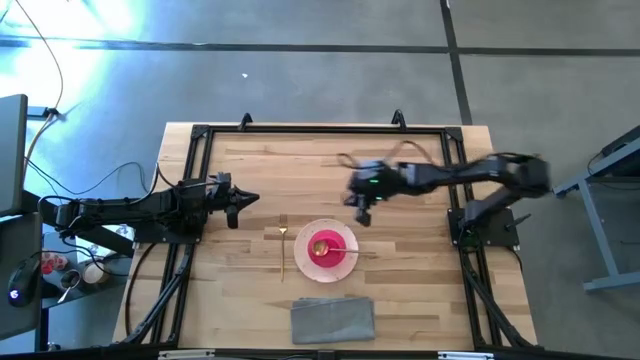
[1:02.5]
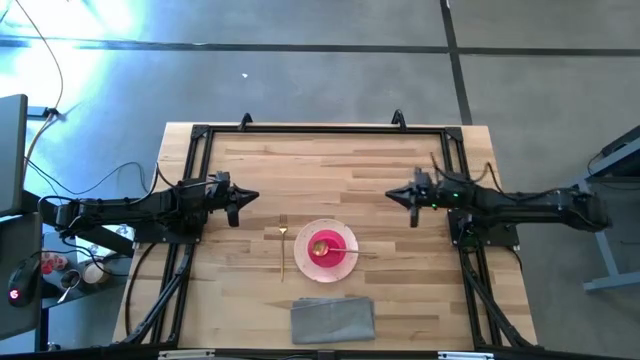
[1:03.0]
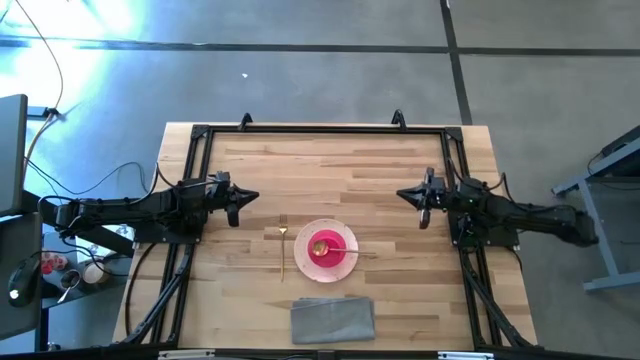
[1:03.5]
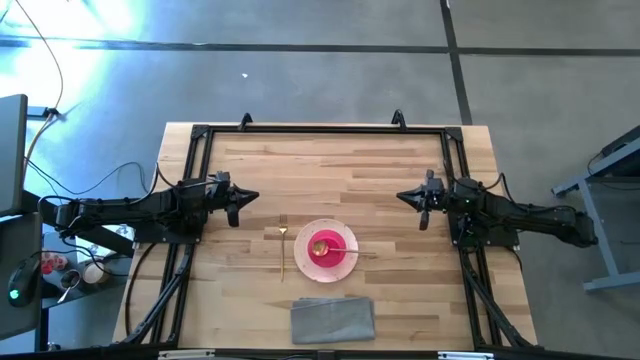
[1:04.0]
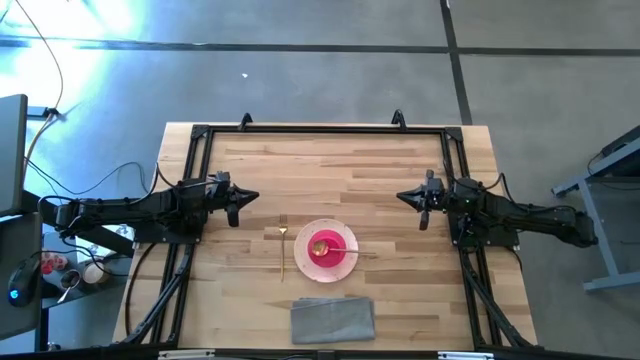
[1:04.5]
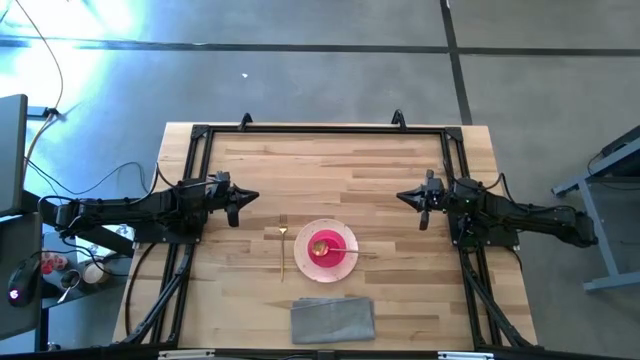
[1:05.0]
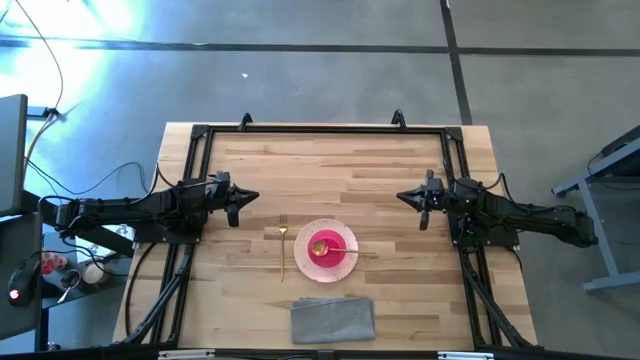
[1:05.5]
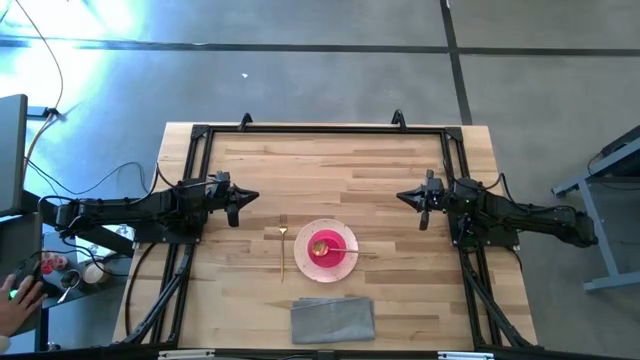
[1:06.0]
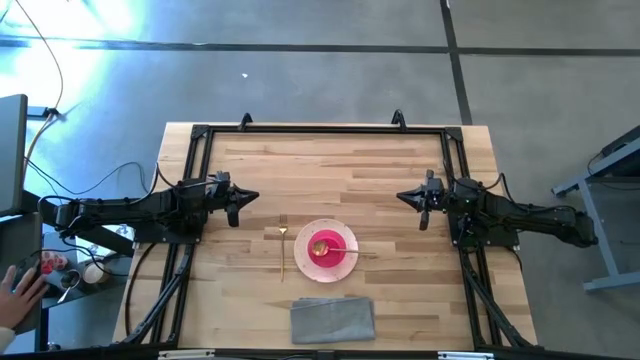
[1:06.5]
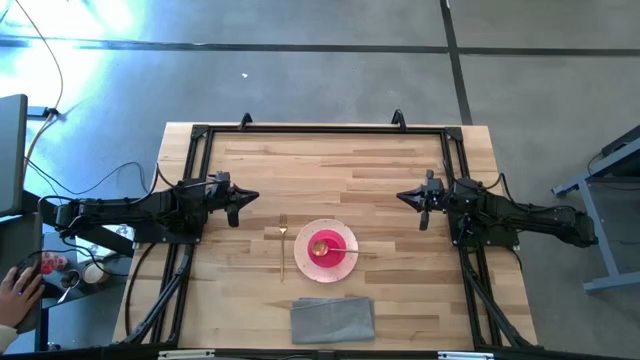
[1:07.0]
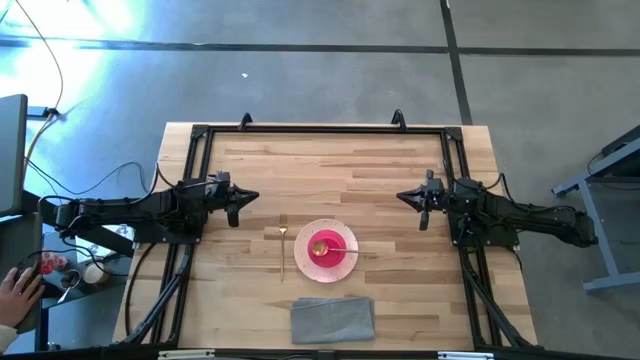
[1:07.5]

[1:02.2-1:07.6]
Task: Set table place
Return to Home Position

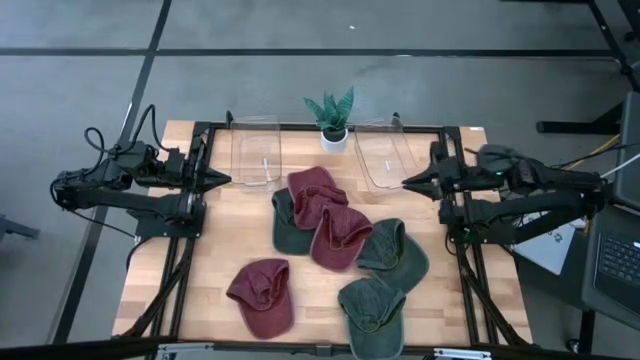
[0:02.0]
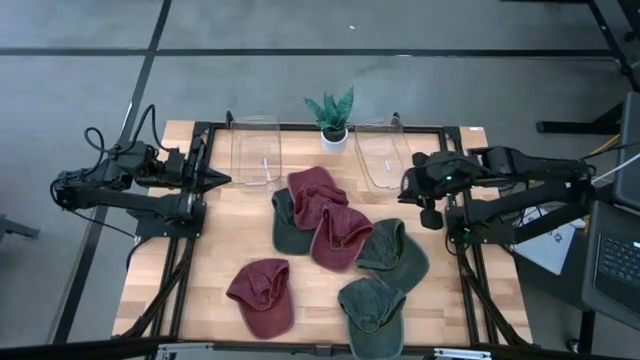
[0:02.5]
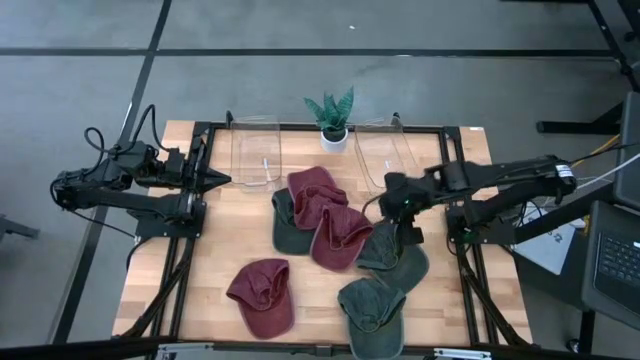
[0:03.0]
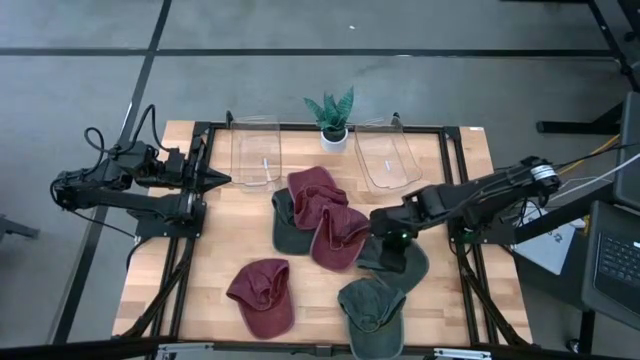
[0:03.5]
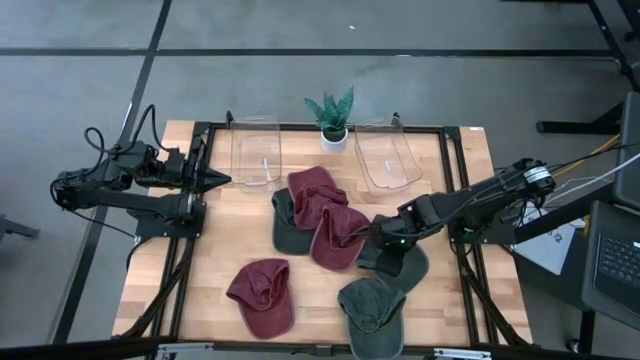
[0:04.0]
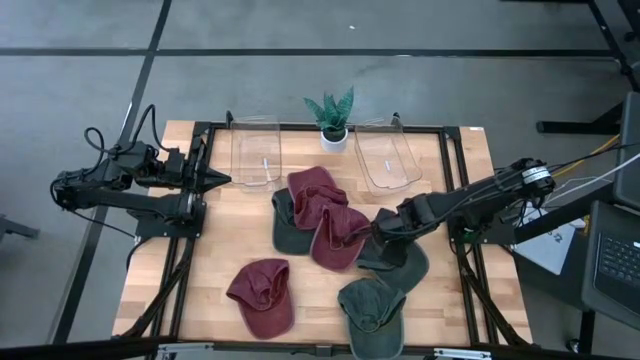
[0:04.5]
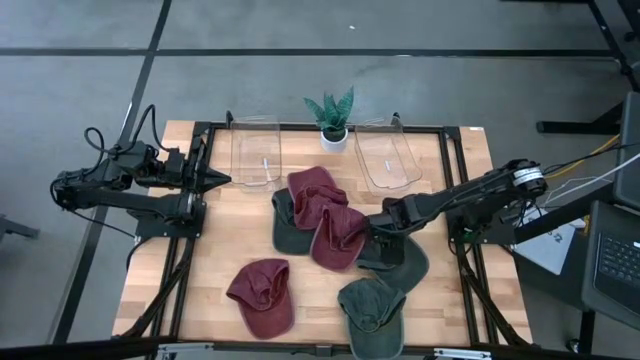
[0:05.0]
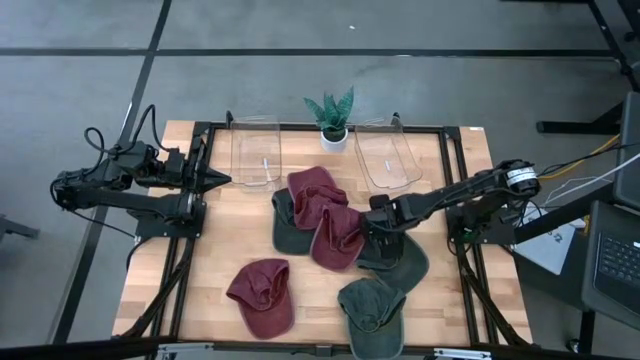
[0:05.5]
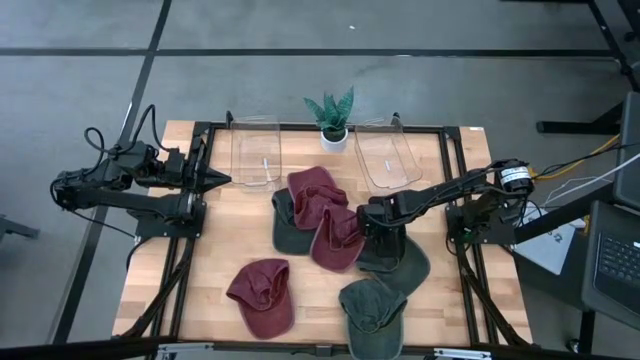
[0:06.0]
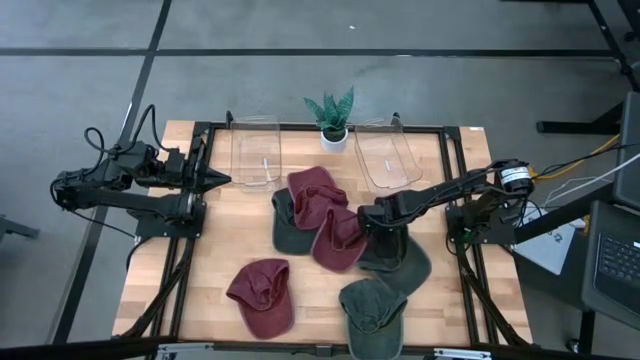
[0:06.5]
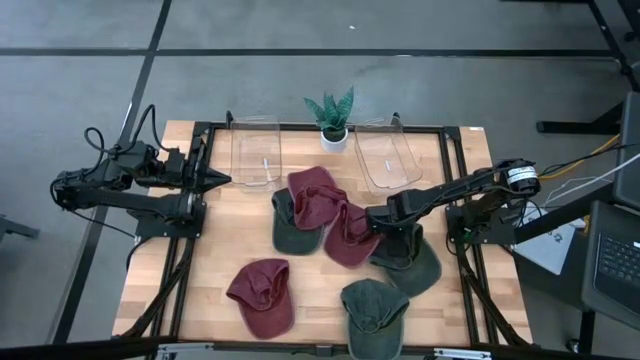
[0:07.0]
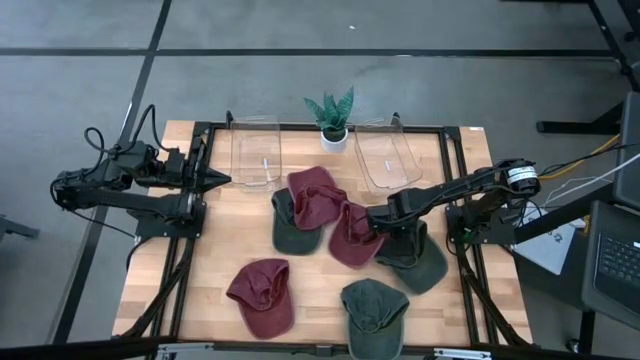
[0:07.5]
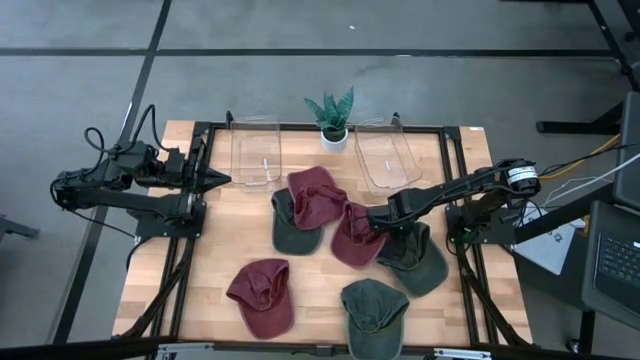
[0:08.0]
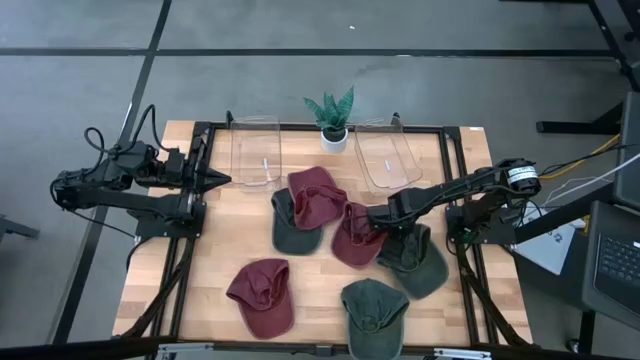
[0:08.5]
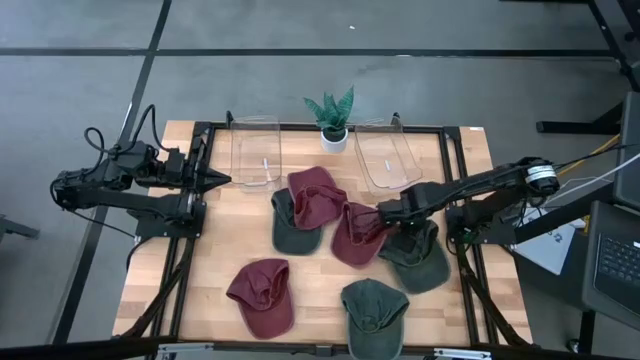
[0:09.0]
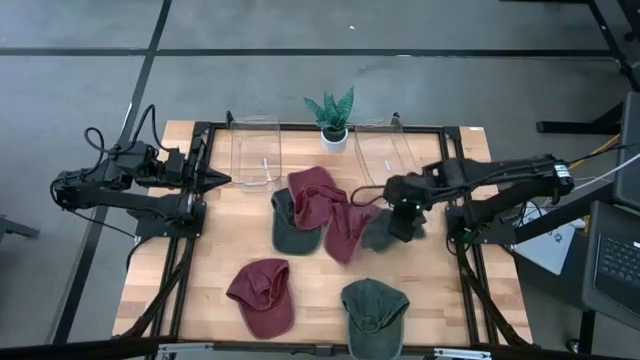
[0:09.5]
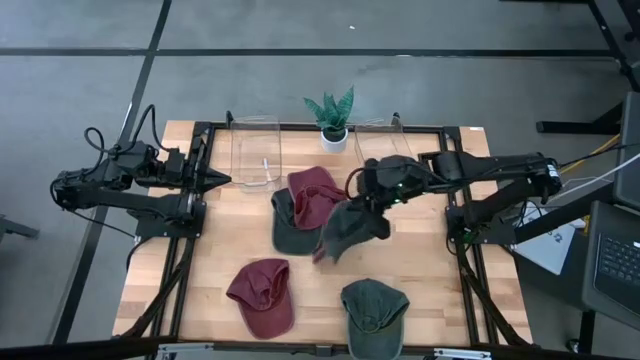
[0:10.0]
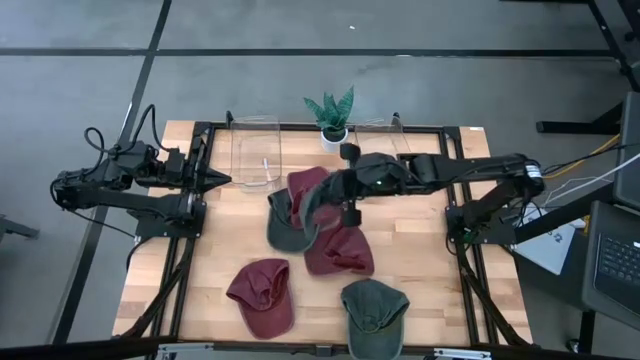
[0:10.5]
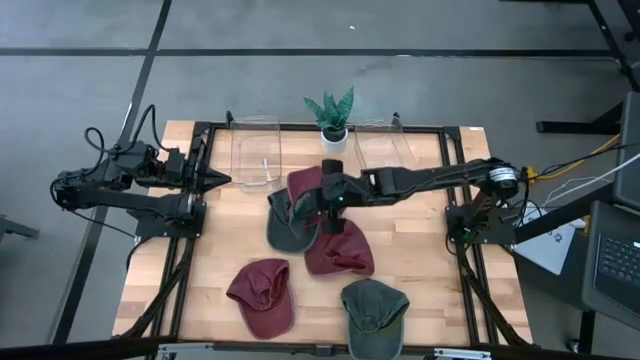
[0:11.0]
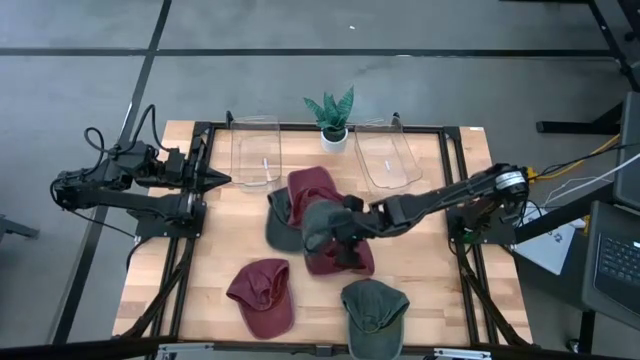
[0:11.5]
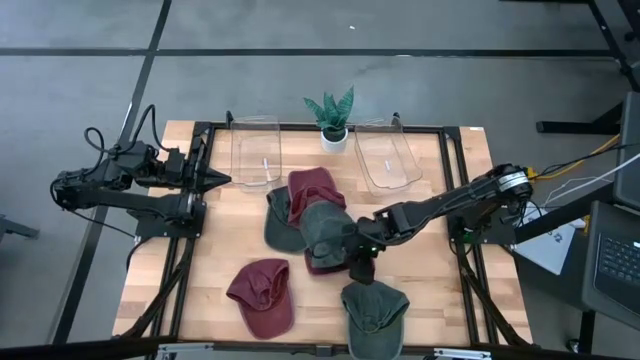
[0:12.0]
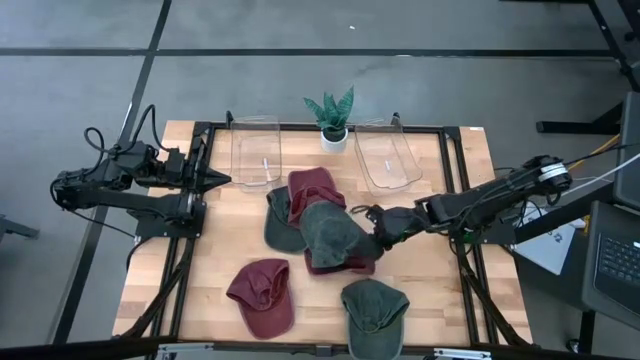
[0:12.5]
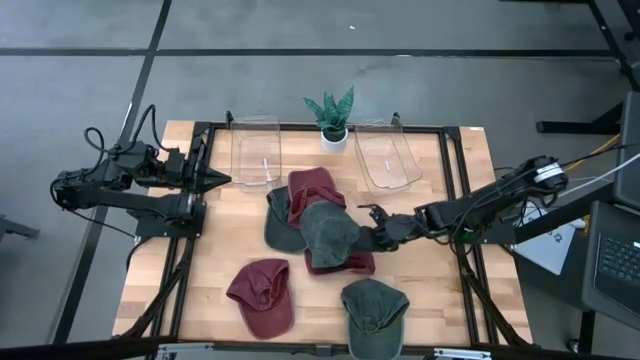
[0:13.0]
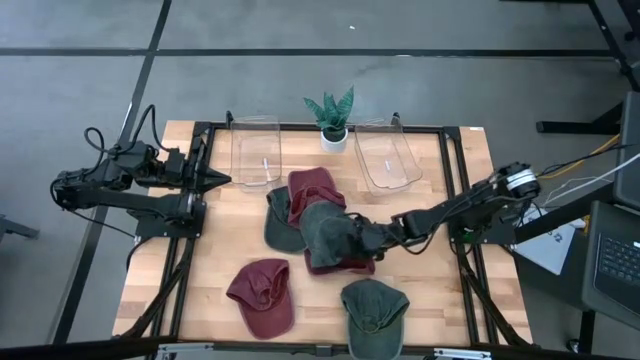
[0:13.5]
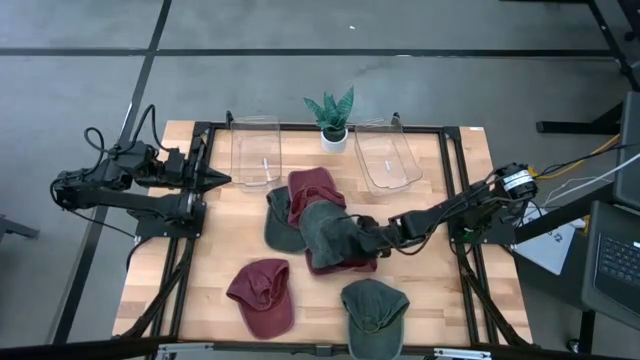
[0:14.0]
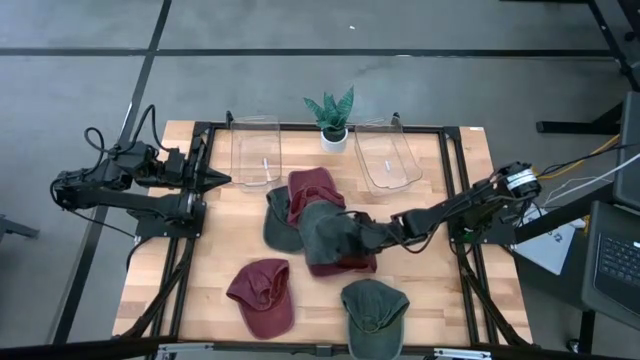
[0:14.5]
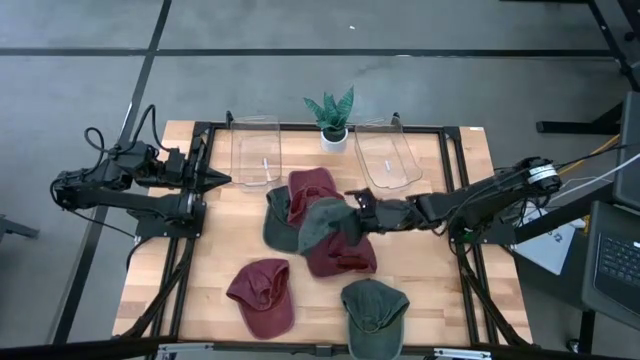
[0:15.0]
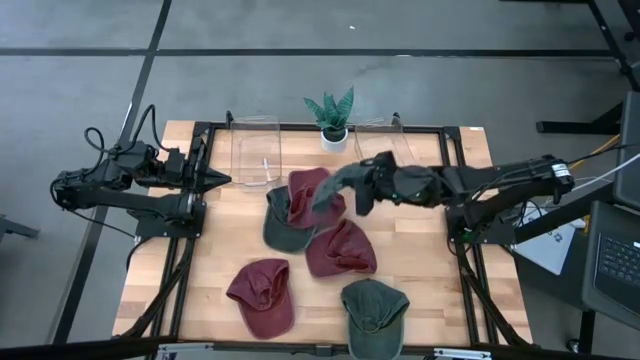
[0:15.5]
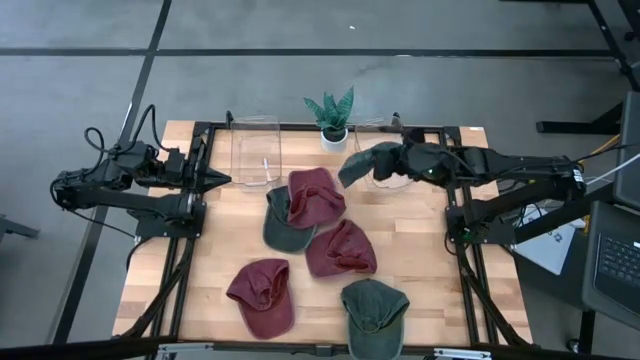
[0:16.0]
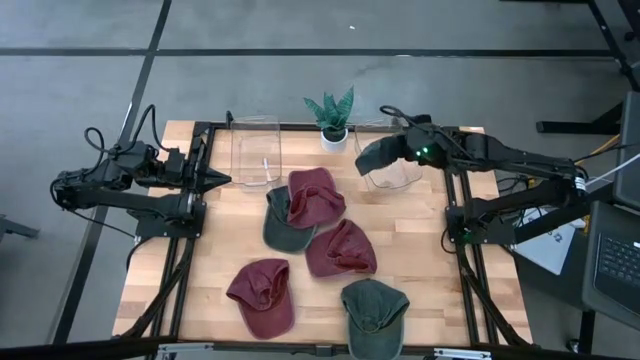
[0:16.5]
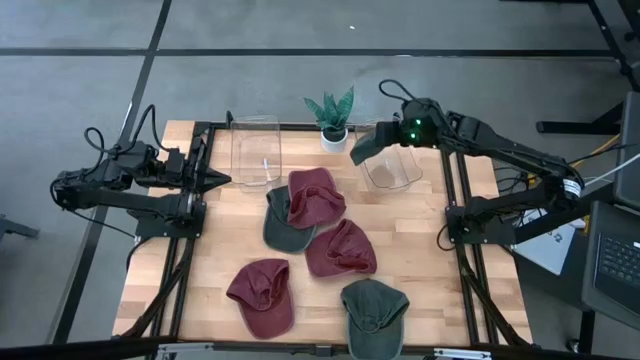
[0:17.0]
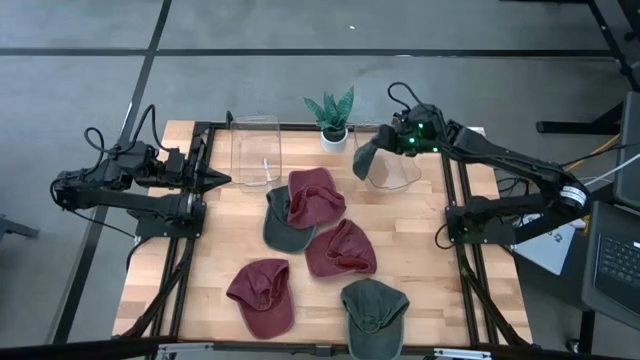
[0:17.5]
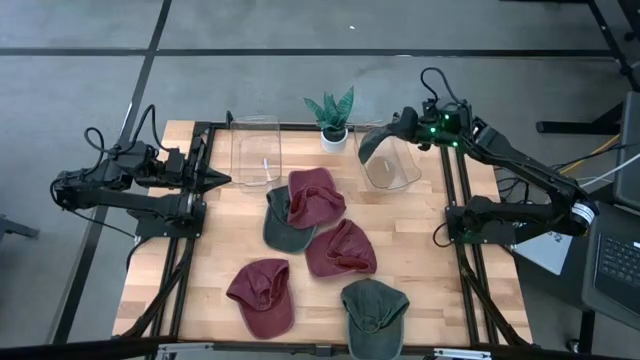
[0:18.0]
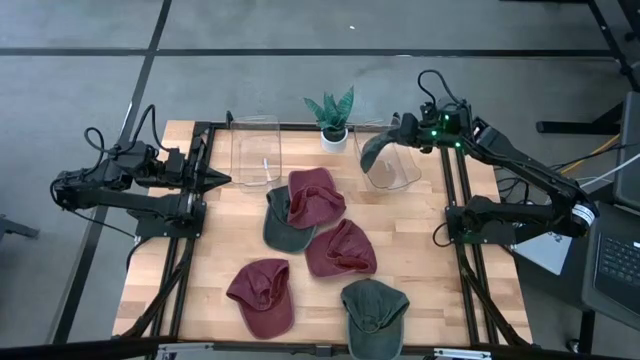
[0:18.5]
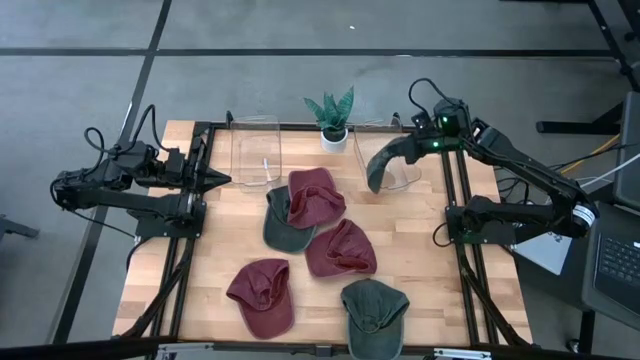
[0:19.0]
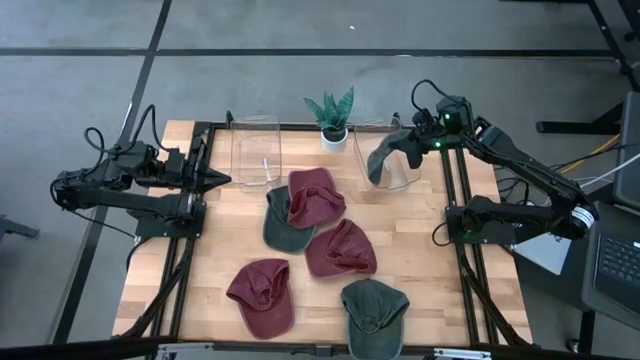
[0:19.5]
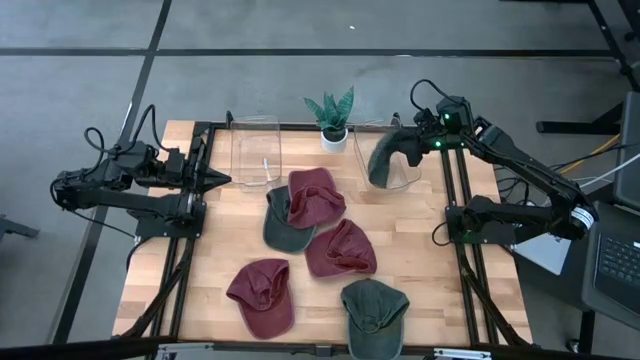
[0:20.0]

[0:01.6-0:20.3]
Task: Pick & Place hat
Put the middle gray cap into the right bin
